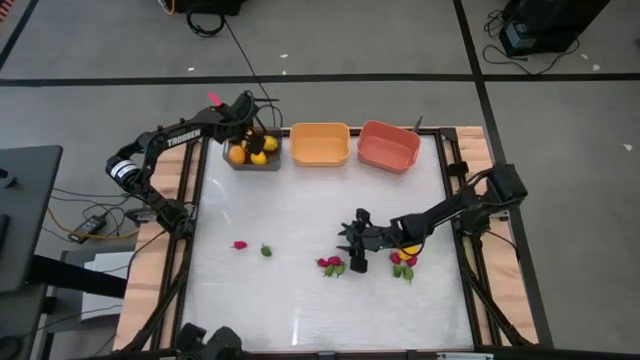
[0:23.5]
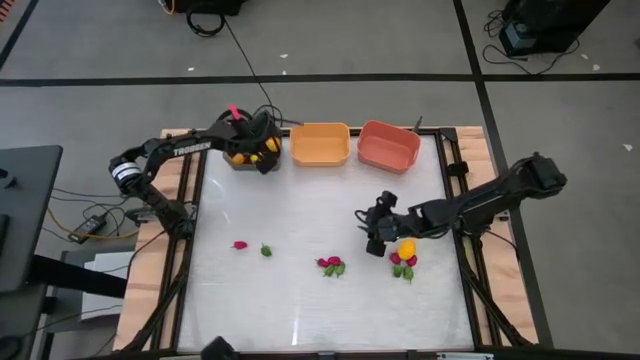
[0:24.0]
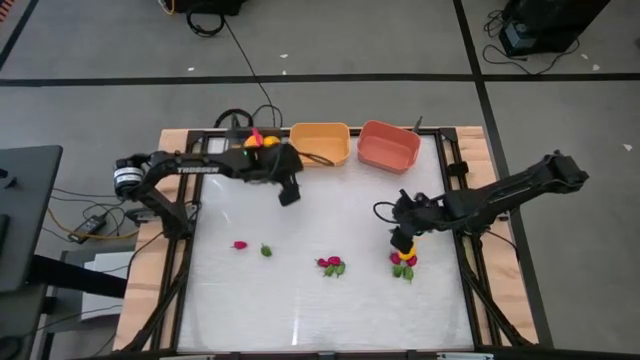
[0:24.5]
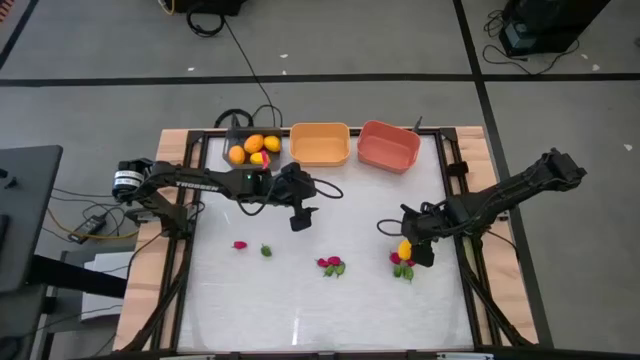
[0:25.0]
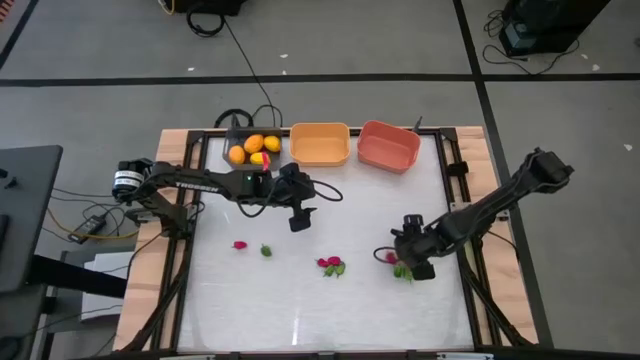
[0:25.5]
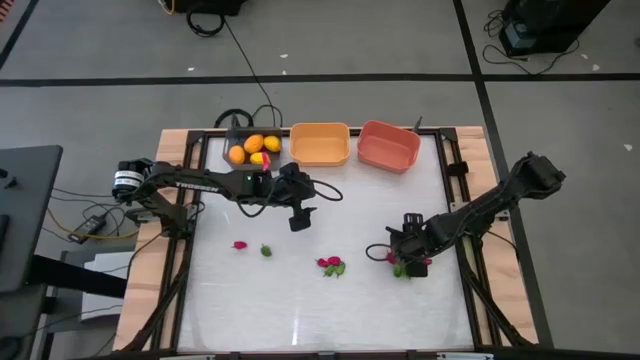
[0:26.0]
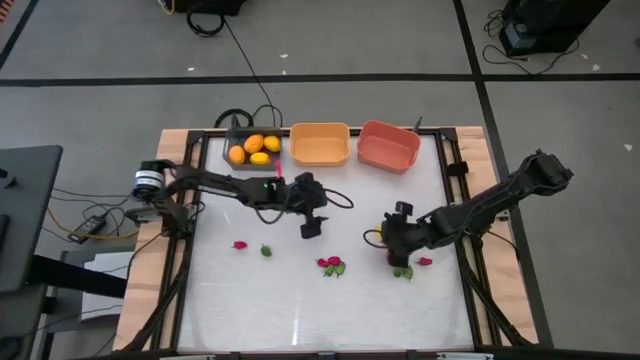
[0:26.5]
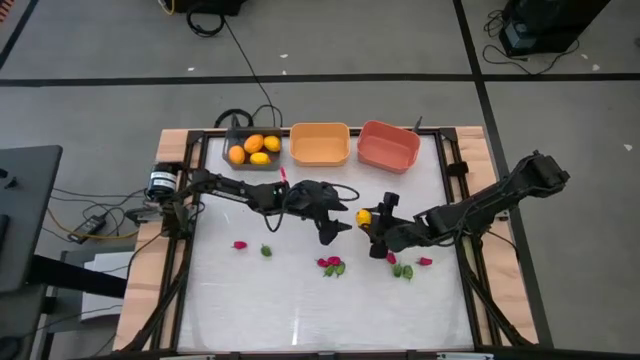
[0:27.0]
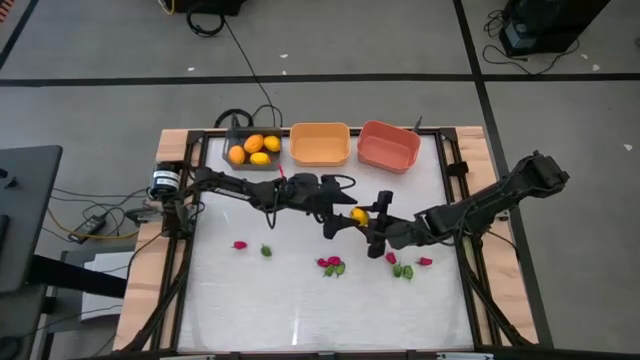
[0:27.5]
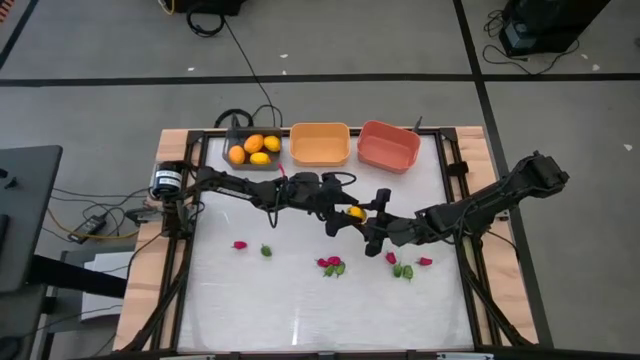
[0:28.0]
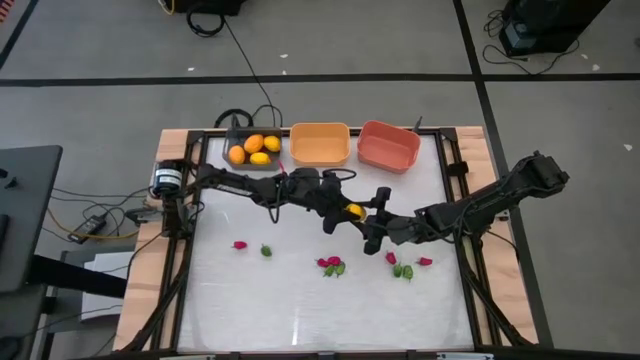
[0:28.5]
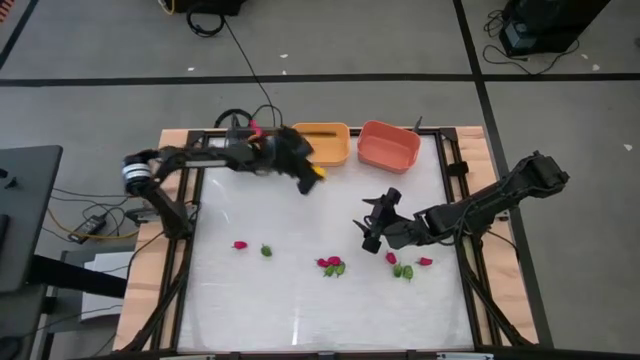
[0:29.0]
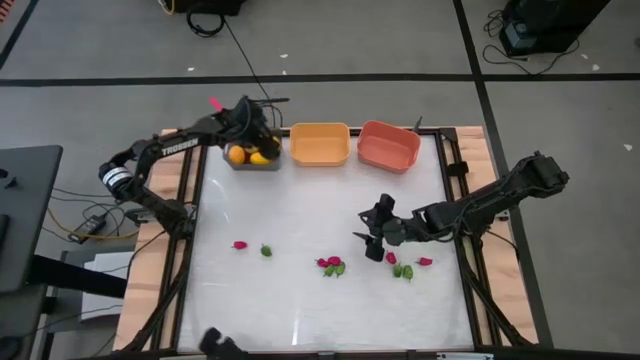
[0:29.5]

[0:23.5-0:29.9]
Task: Sort produce into baskets
Put the lemon into the black bin

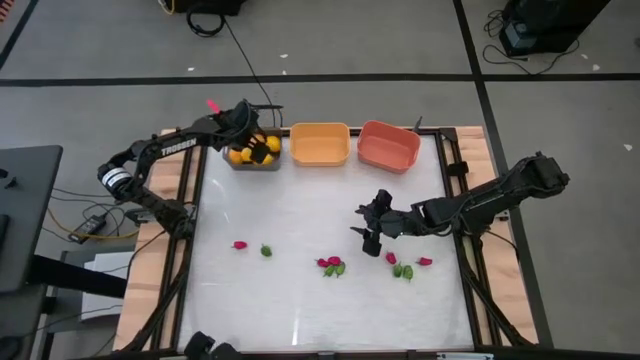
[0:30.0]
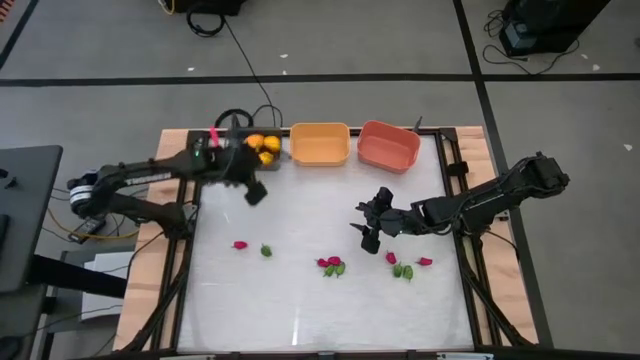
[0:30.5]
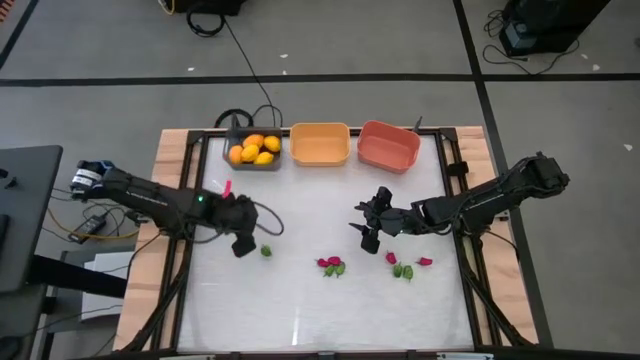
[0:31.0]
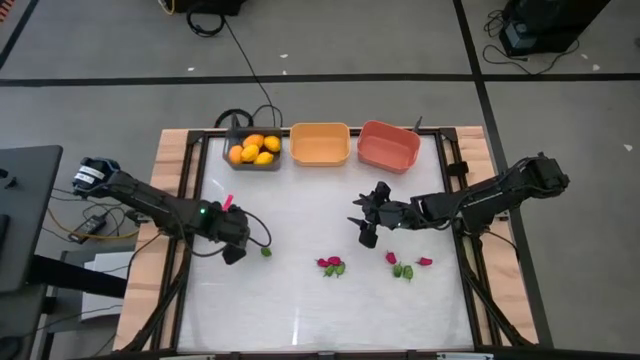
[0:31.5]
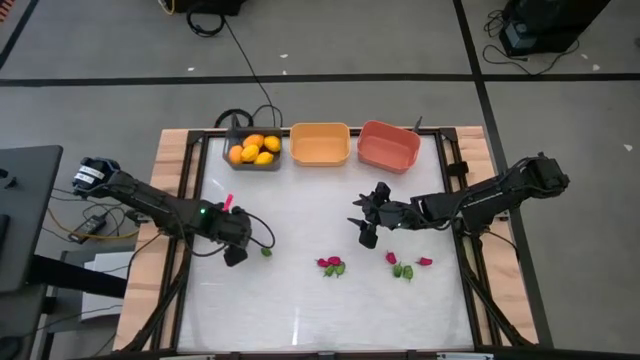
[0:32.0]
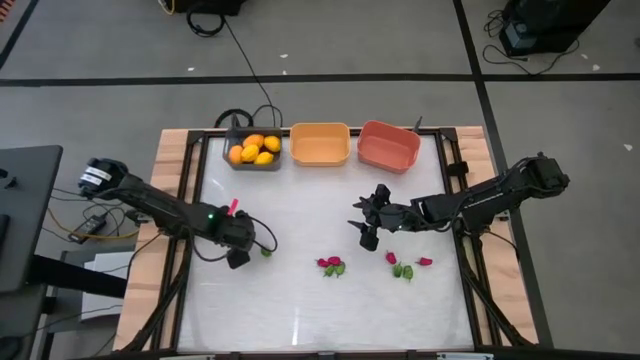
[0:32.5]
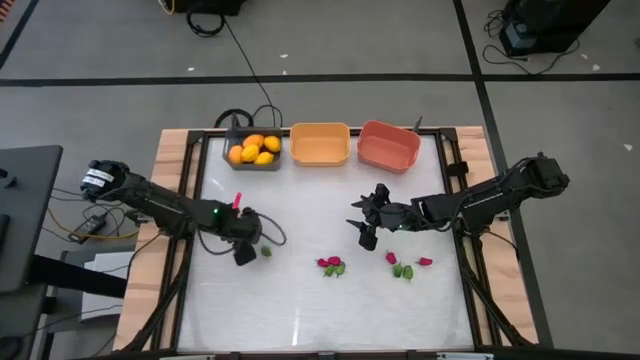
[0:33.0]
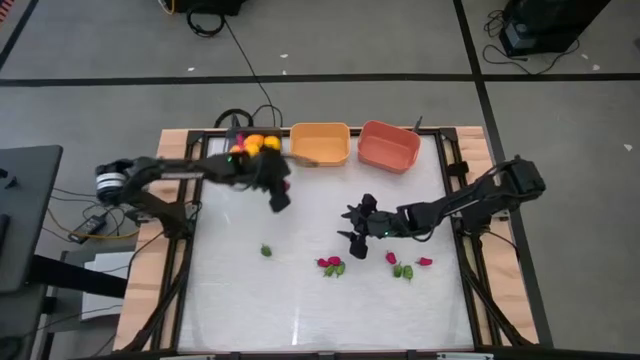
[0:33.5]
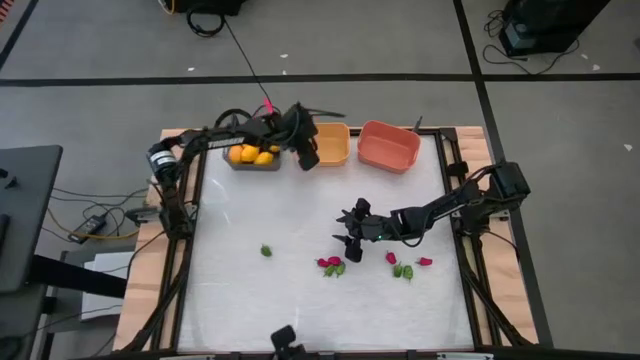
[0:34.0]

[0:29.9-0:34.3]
Put the red chili pepper into the yellow bin

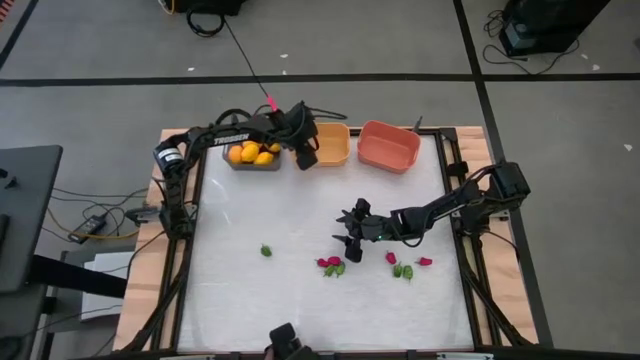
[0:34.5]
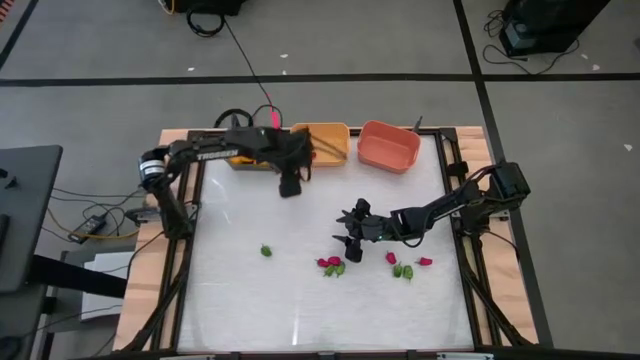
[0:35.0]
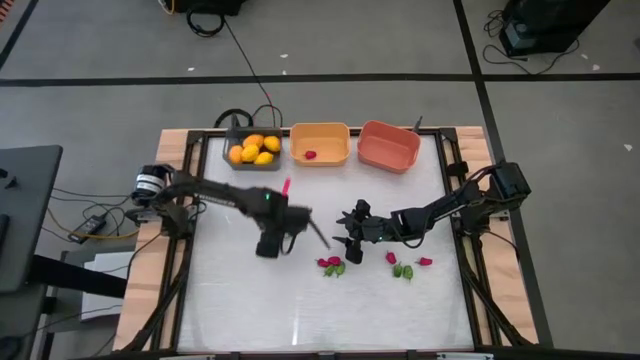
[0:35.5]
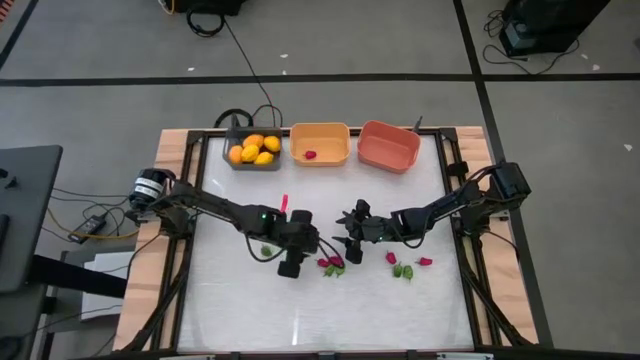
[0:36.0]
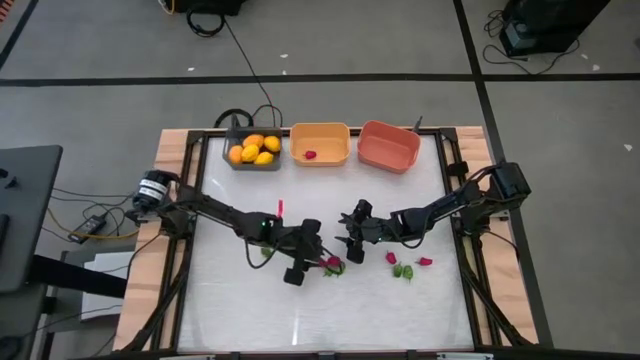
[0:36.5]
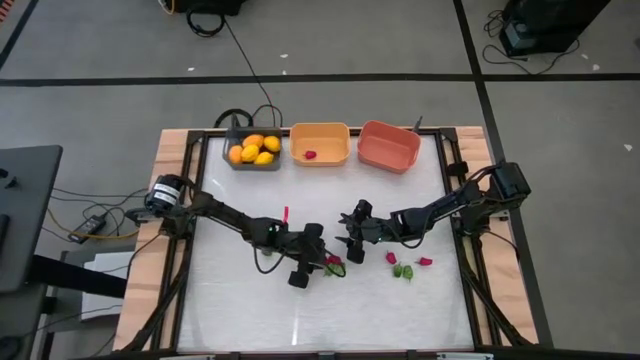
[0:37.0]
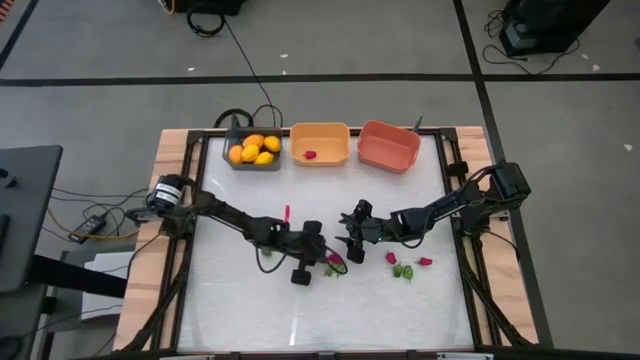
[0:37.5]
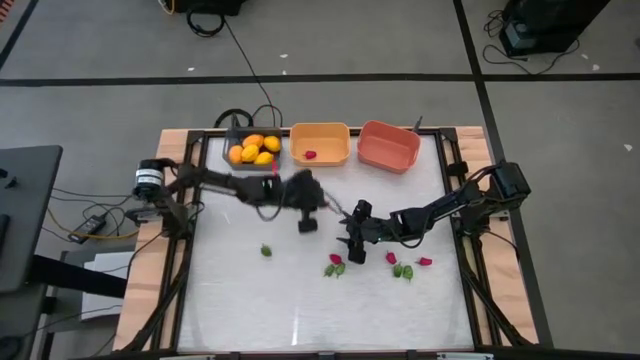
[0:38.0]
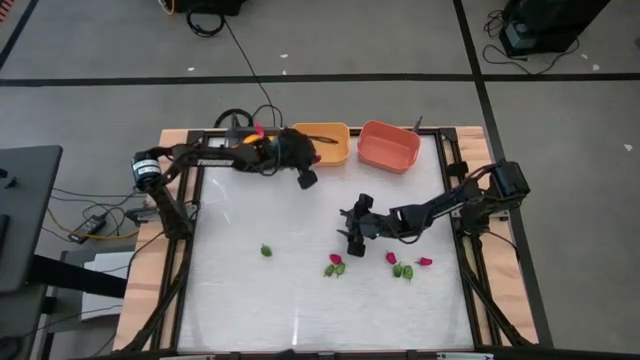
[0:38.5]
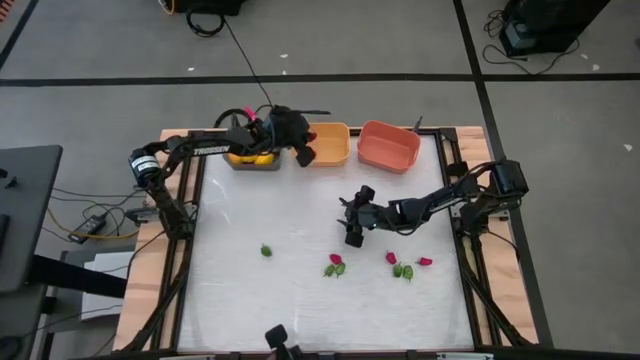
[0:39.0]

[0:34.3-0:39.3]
Put the red chili pepper into the yellow bin

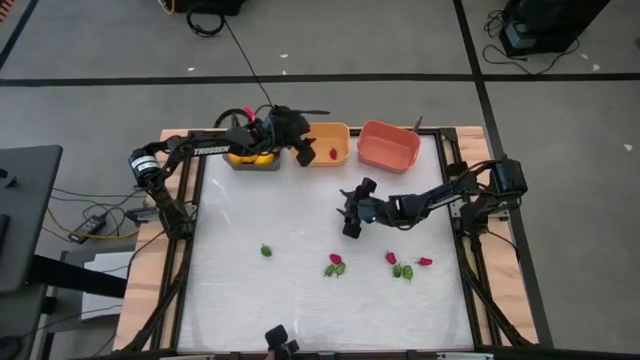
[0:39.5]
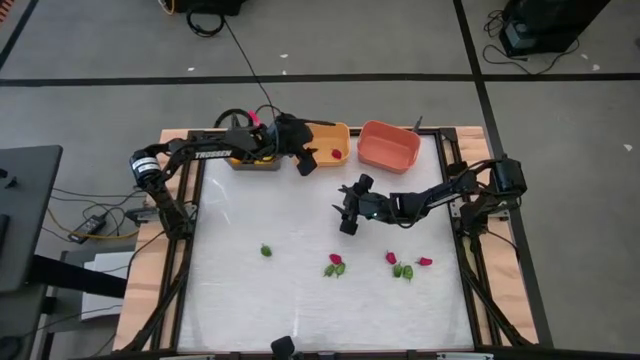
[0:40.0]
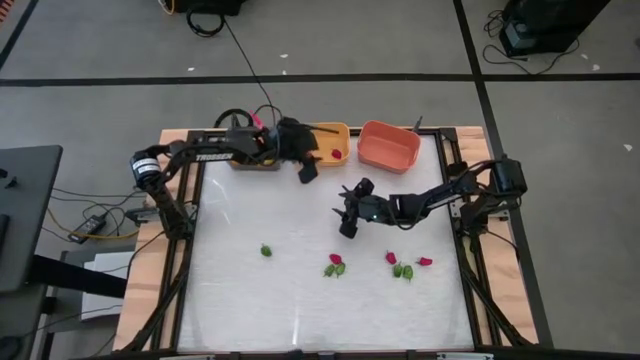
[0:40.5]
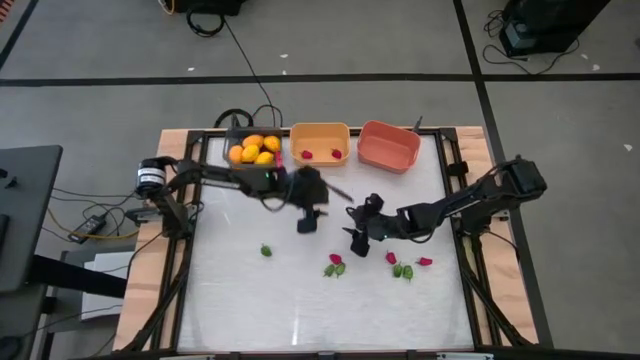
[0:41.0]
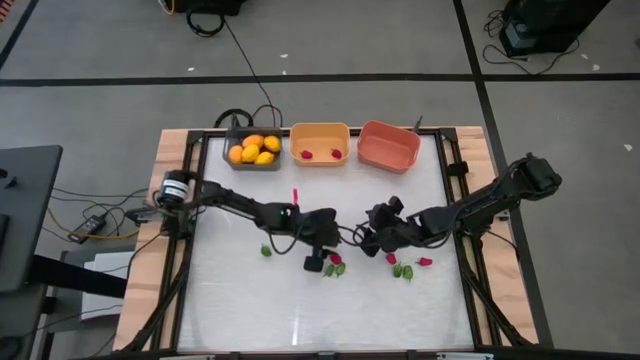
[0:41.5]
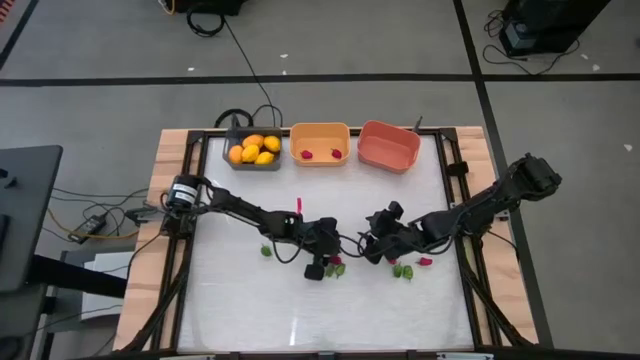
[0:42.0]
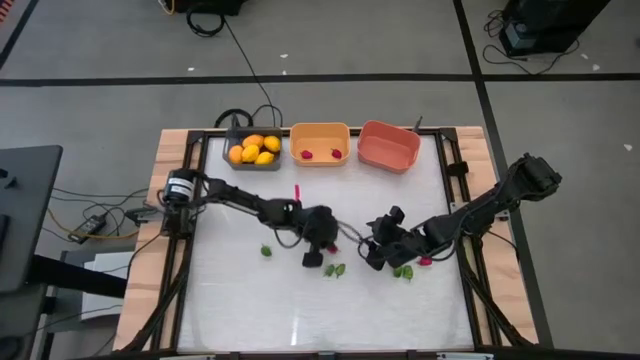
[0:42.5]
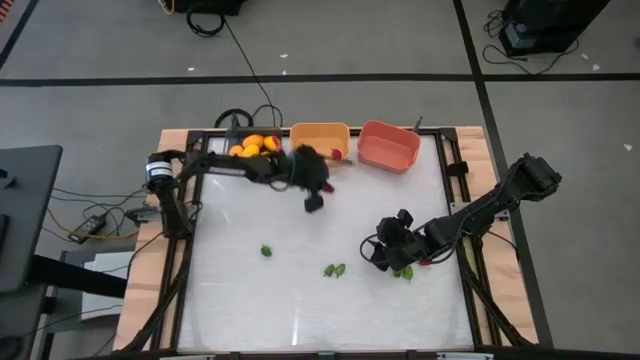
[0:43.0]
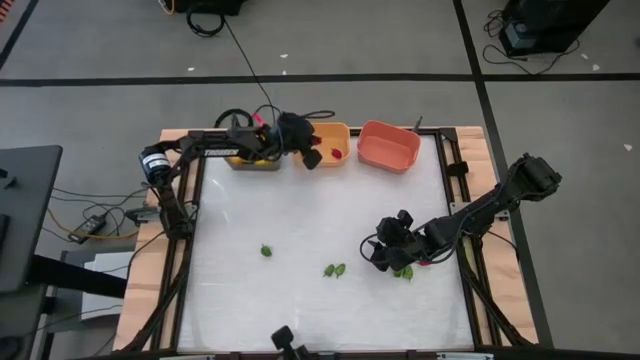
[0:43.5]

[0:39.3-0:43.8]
Put the red chili pepper into the yellow bin
